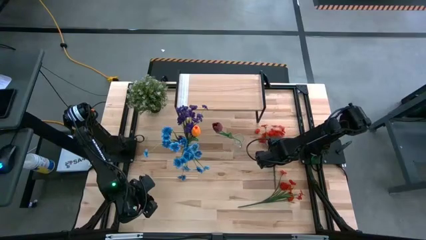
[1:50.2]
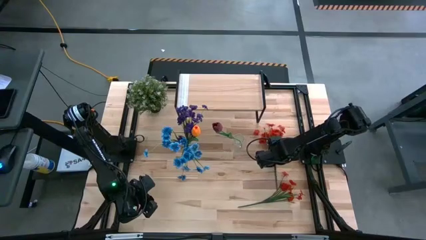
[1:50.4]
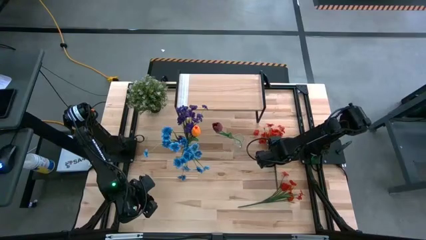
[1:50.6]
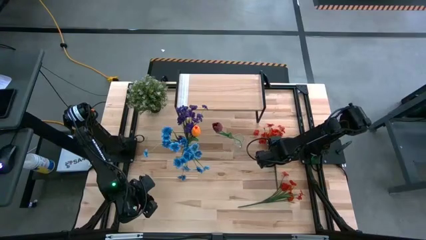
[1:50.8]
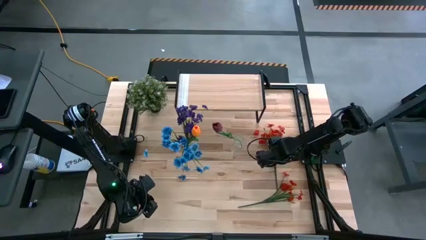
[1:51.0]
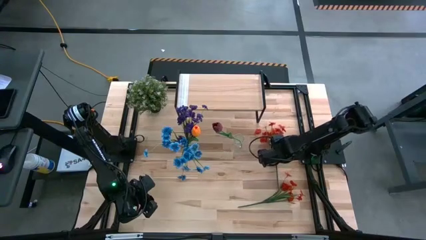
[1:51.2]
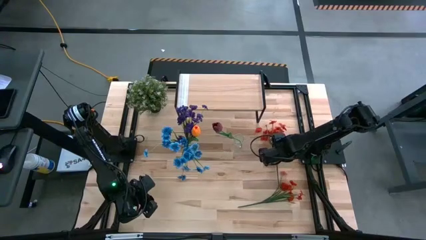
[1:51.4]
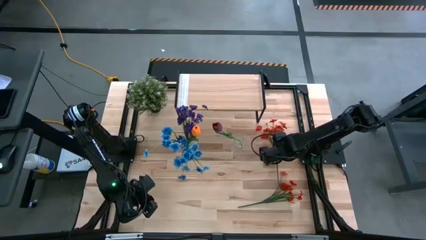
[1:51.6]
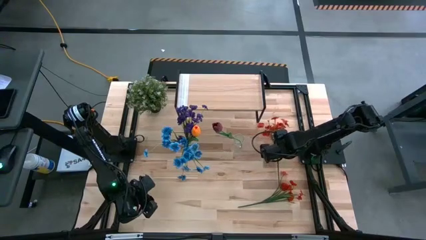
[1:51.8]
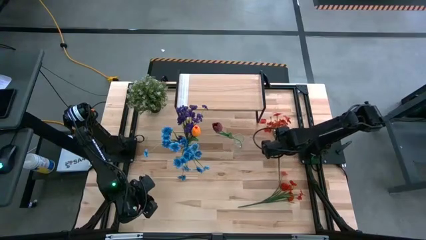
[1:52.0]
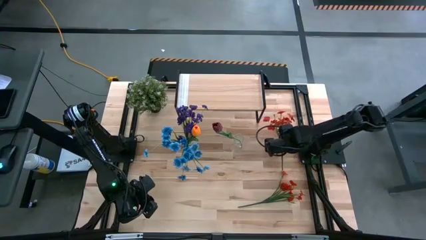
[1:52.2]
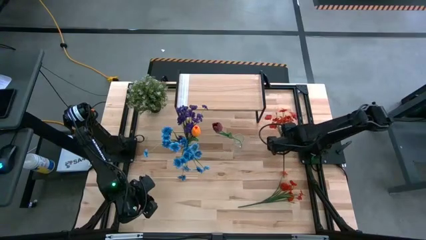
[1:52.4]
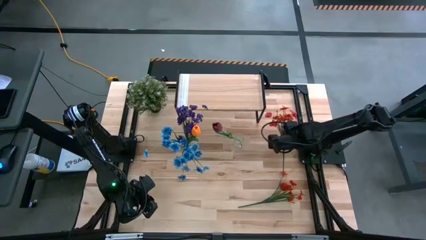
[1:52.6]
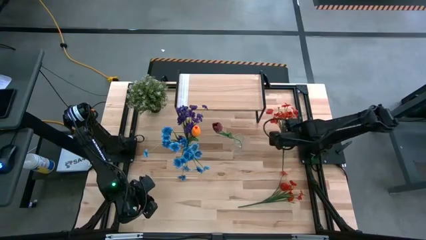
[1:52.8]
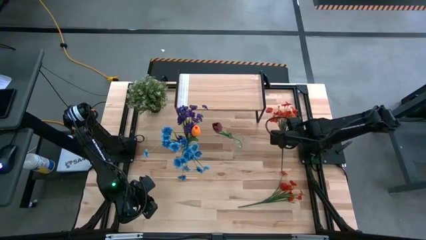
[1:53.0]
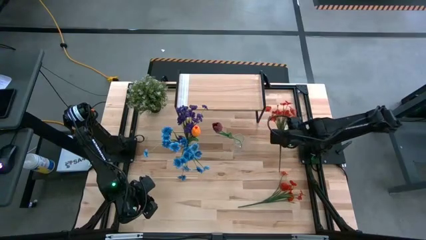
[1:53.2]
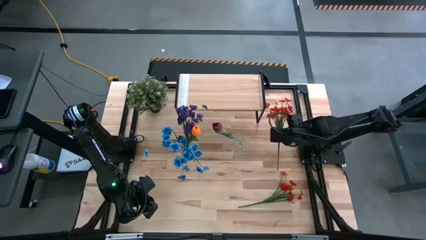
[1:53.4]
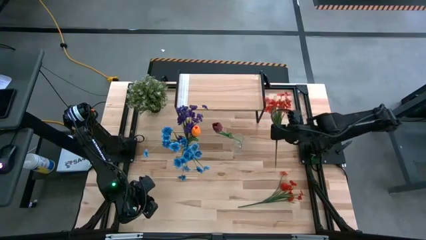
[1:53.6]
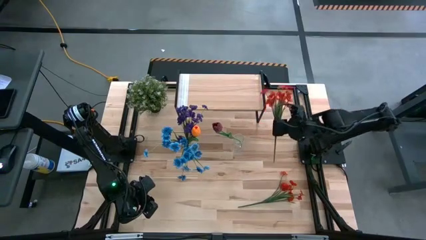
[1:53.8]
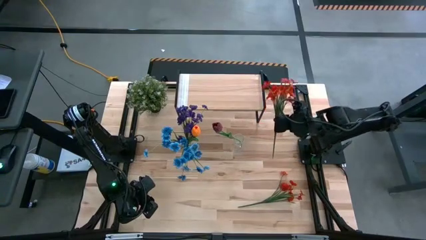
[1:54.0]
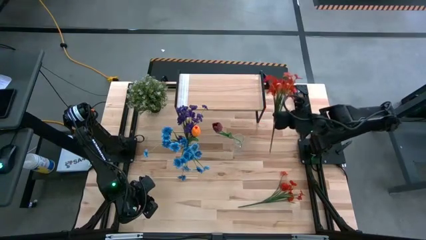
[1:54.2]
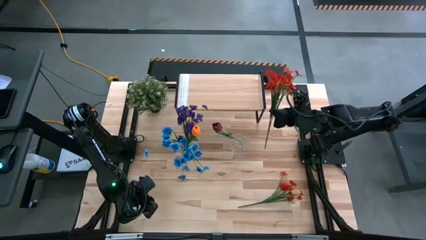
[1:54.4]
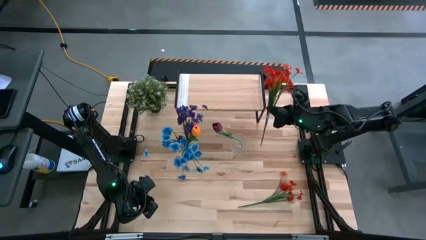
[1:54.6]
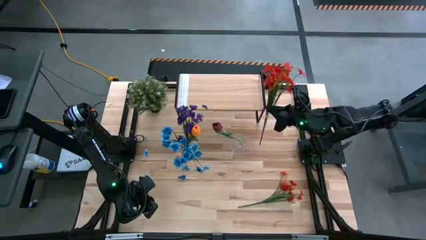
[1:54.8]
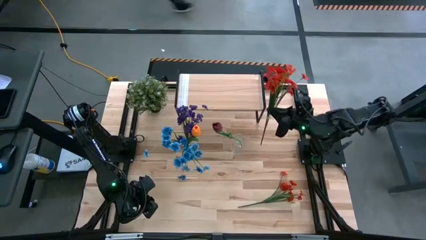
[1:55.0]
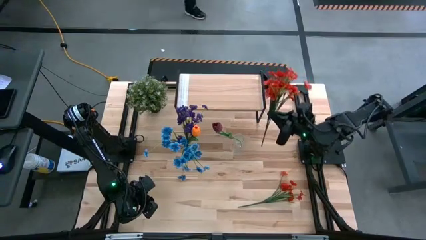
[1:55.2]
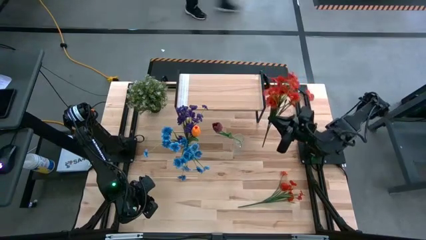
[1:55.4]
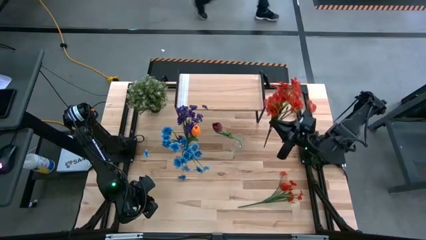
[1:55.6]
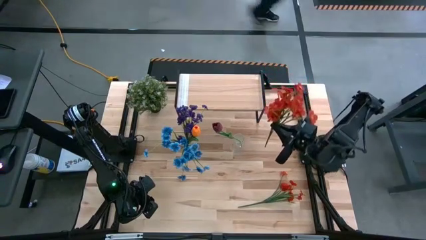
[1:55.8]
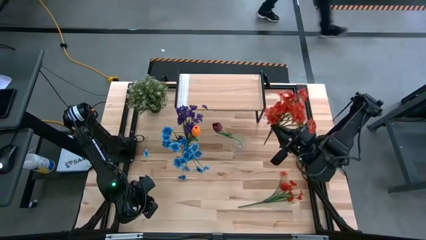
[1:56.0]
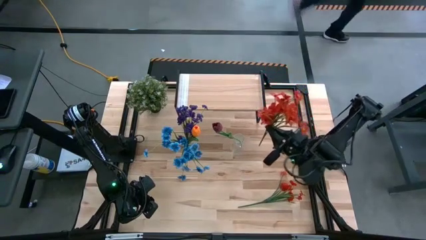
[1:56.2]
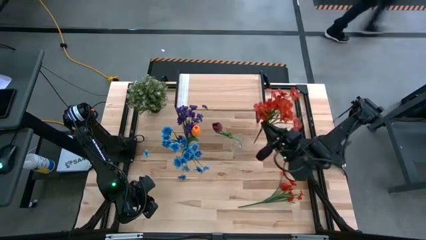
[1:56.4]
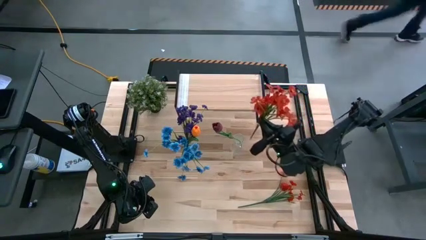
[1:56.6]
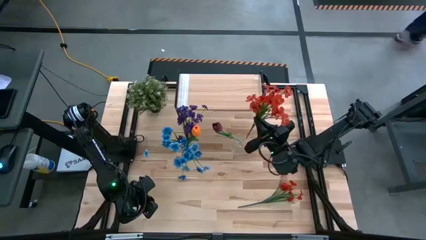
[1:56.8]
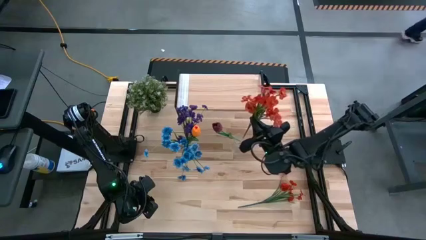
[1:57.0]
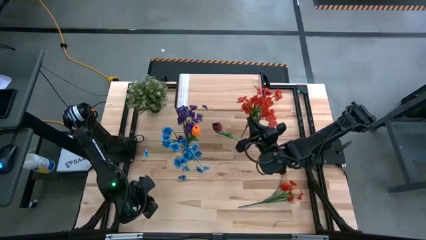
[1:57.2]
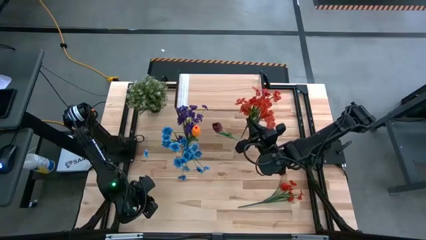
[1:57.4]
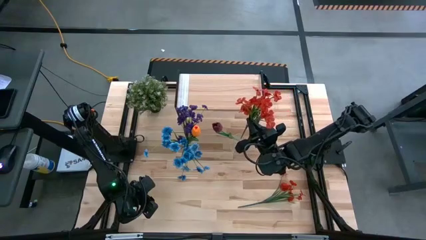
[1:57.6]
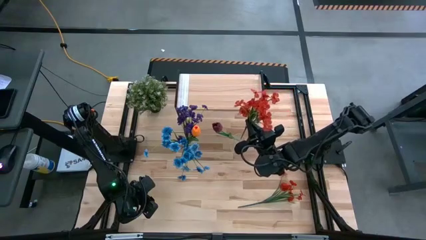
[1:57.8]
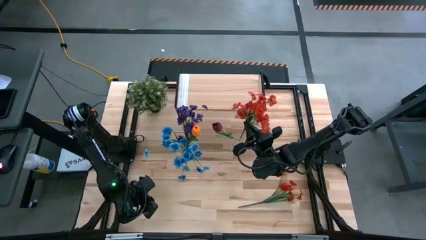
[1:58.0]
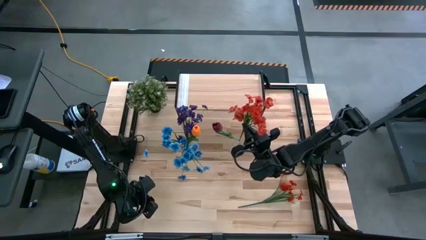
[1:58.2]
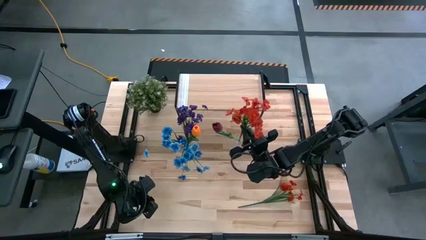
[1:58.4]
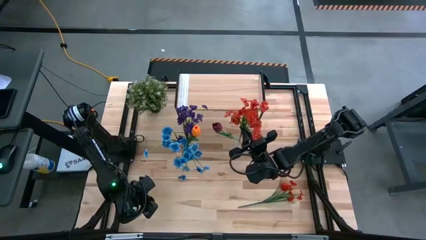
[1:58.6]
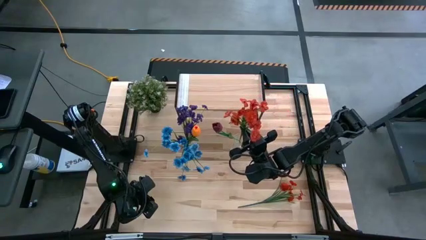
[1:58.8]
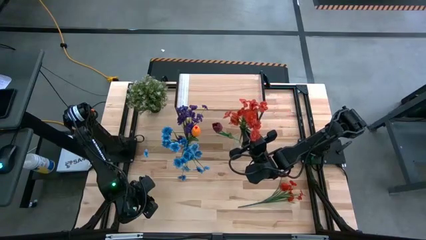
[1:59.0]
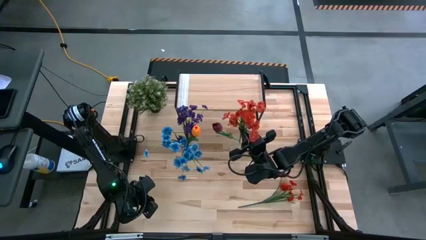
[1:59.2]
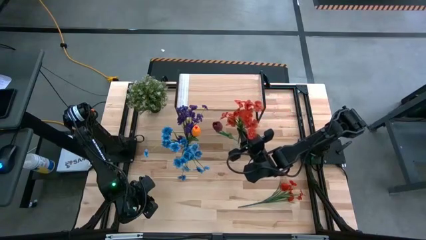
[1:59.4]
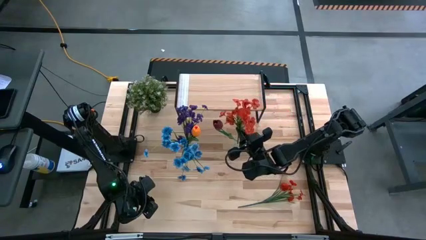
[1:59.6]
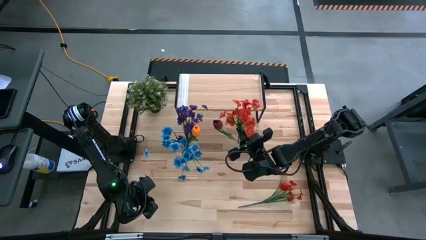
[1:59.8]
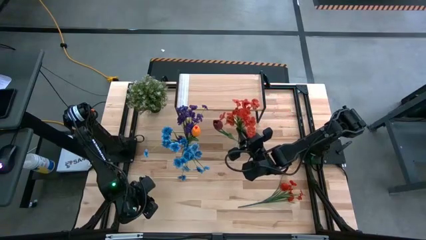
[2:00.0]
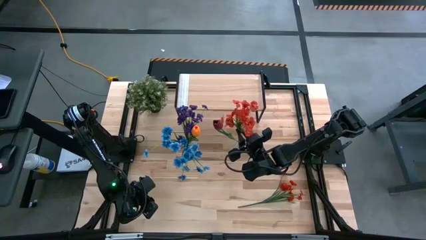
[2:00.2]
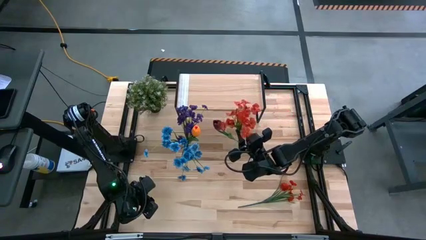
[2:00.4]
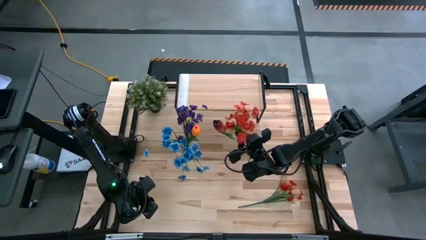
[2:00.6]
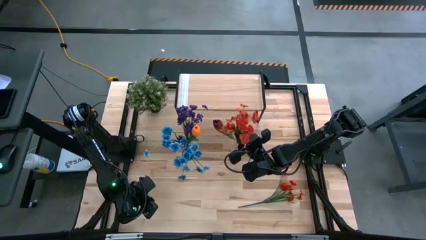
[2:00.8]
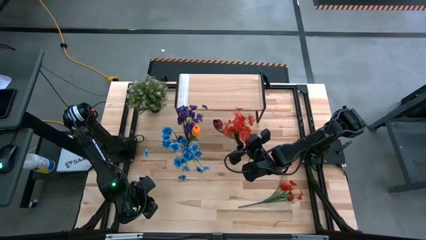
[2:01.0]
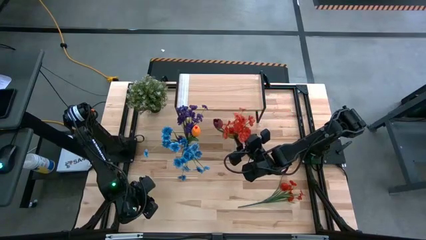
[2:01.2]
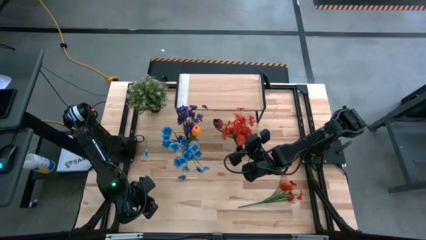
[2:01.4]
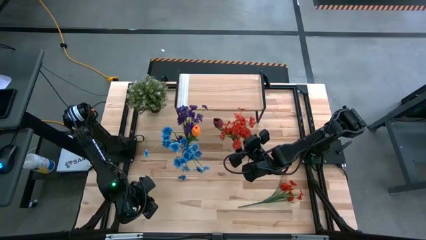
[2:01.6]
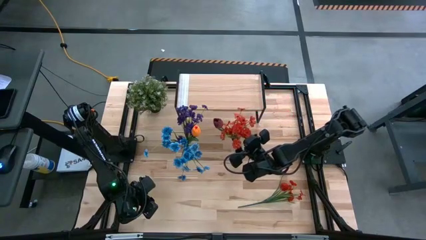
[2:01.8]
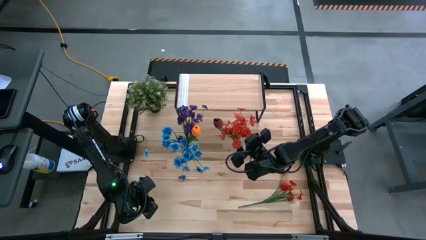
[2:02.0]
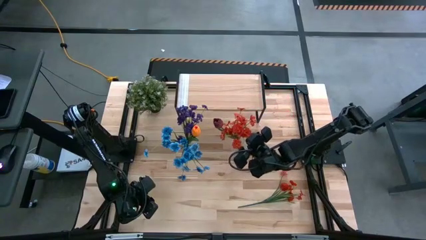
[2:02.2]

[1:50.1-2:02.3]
Task: Pick and place flowers into a vace then onto a shelf
Put the top orange flowers into the right transparent vase
